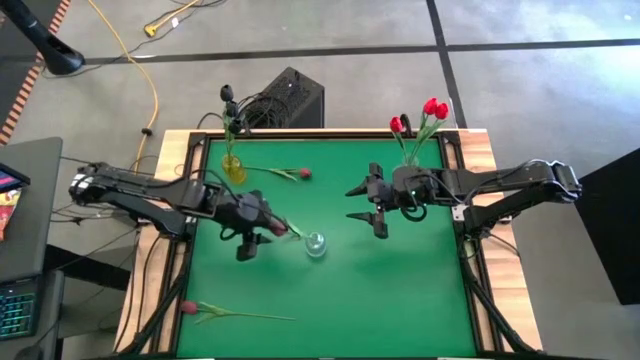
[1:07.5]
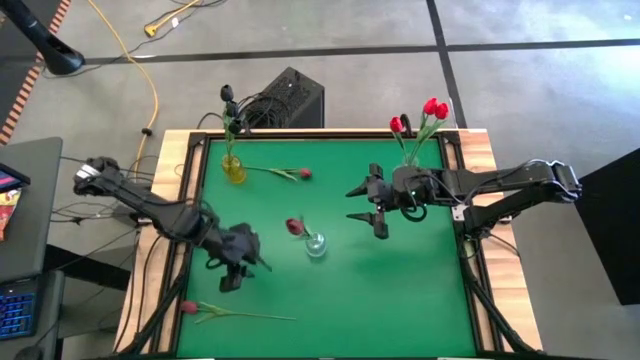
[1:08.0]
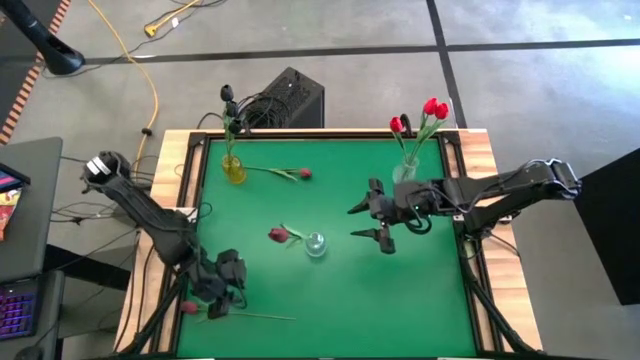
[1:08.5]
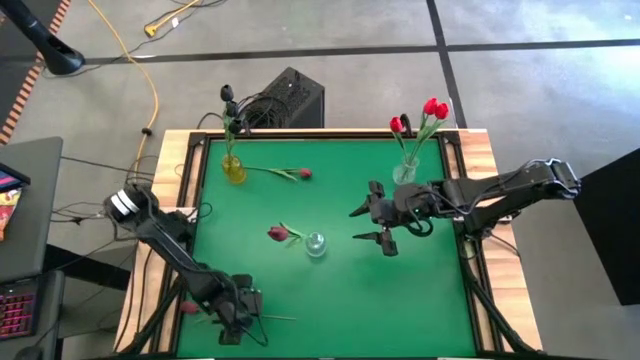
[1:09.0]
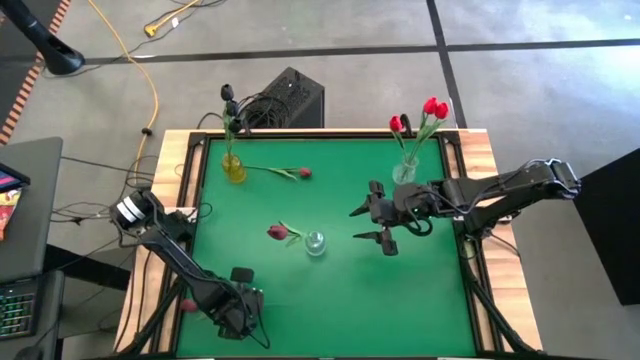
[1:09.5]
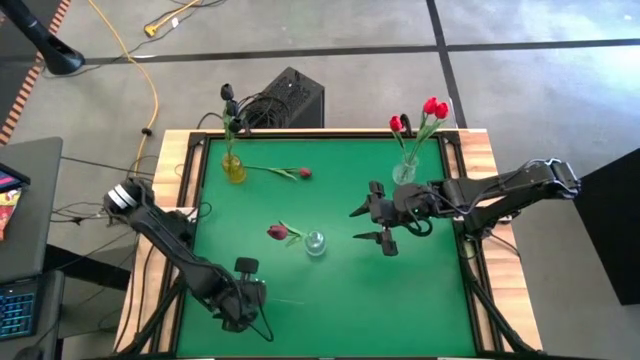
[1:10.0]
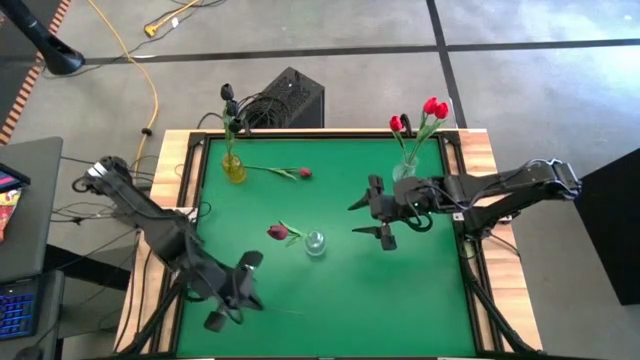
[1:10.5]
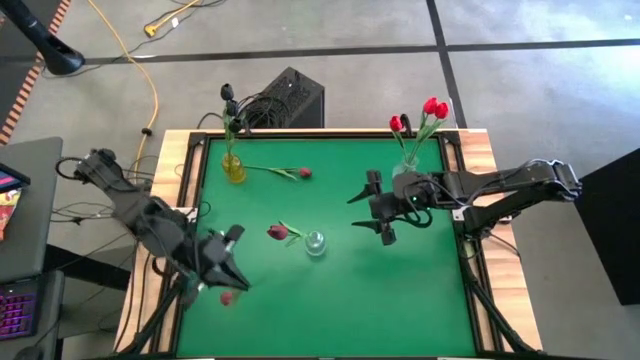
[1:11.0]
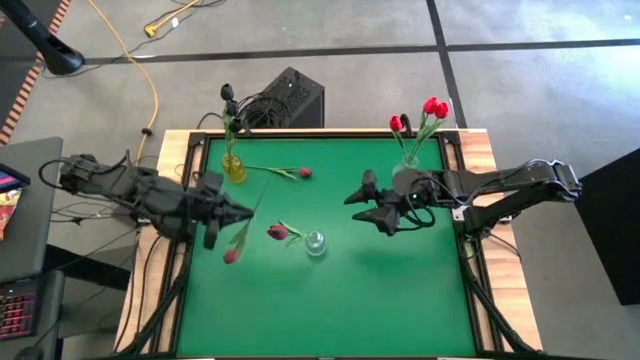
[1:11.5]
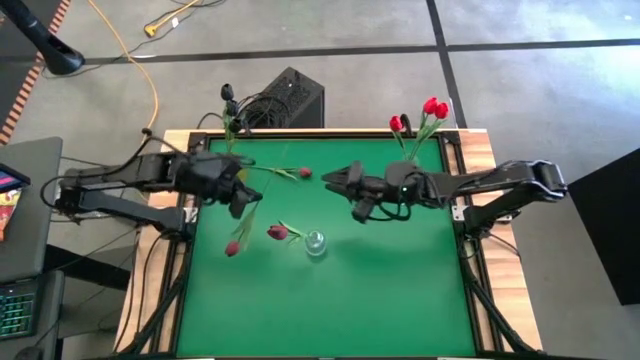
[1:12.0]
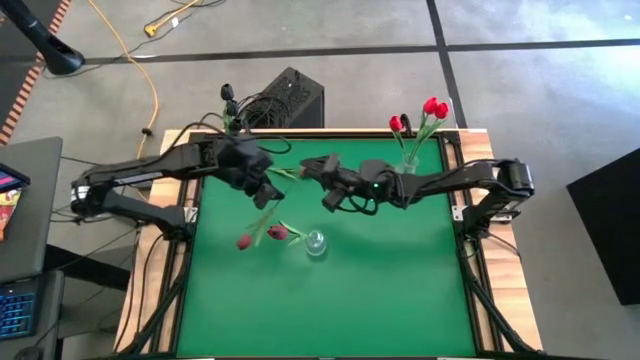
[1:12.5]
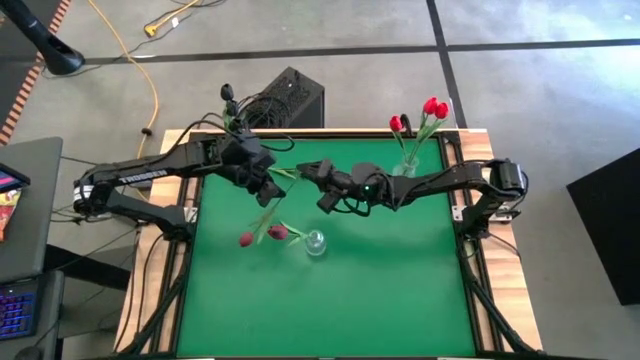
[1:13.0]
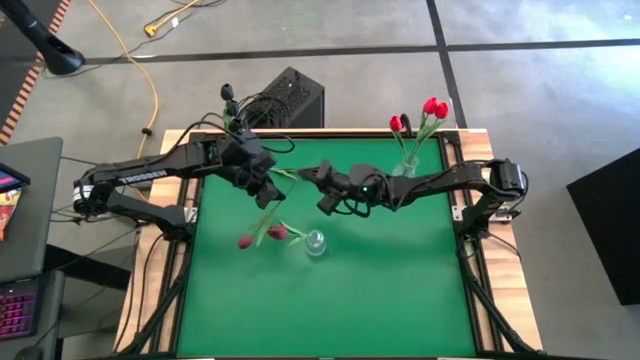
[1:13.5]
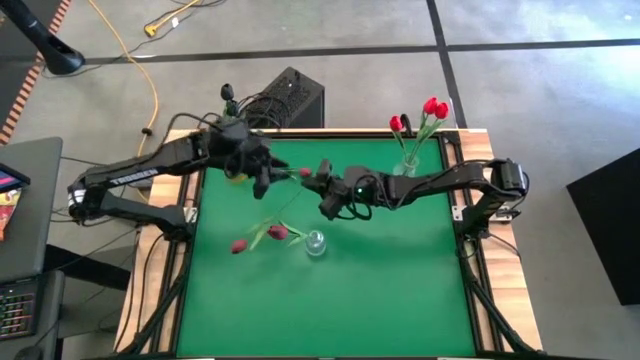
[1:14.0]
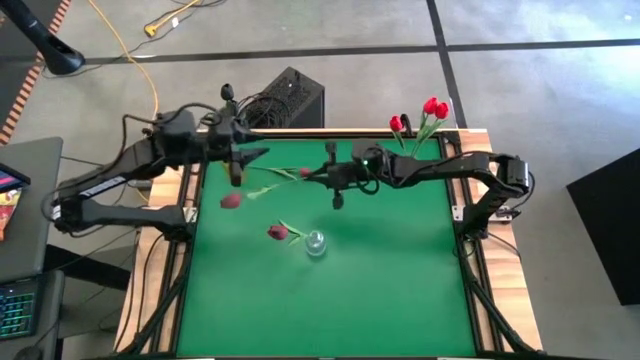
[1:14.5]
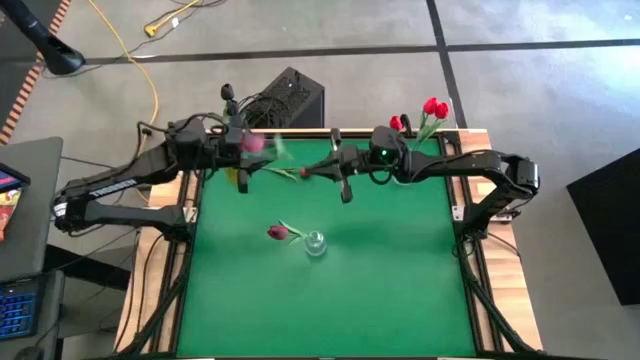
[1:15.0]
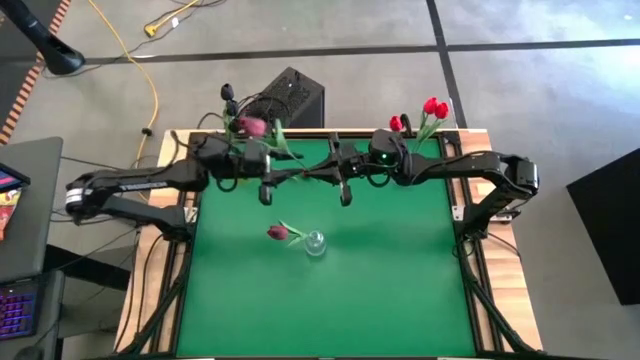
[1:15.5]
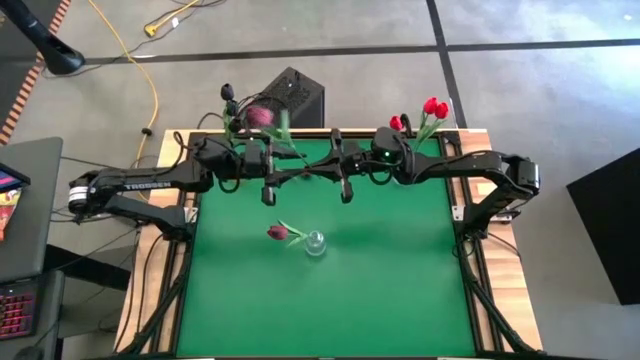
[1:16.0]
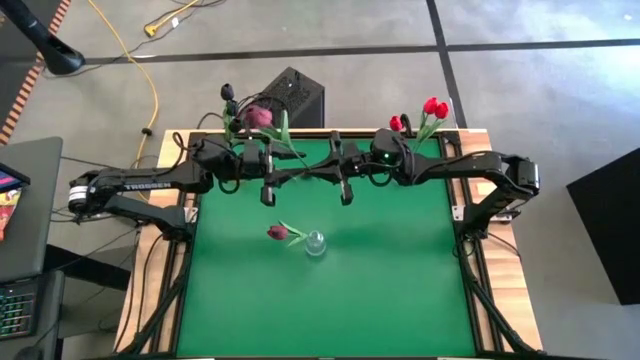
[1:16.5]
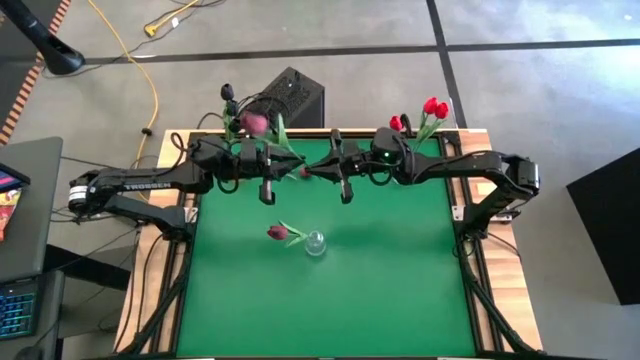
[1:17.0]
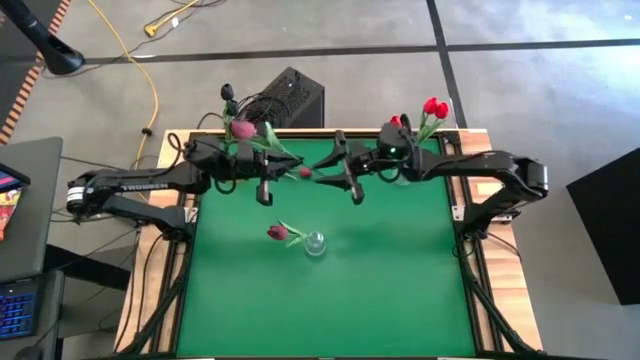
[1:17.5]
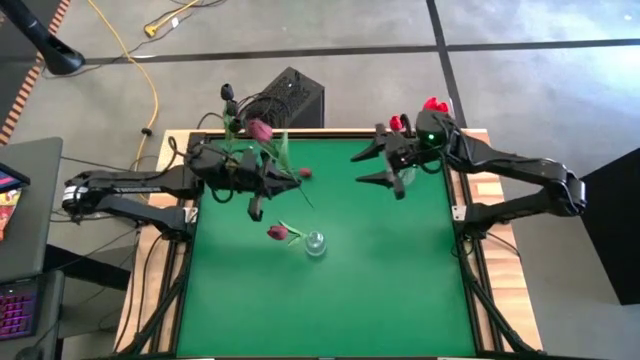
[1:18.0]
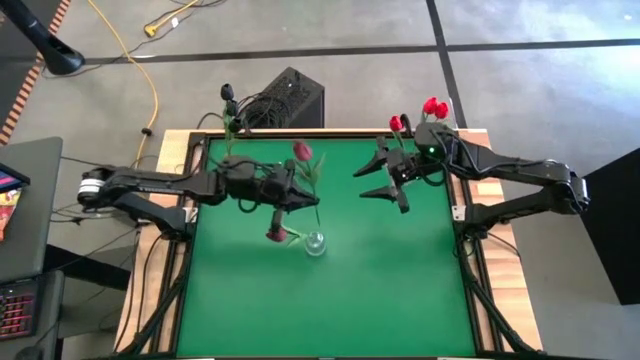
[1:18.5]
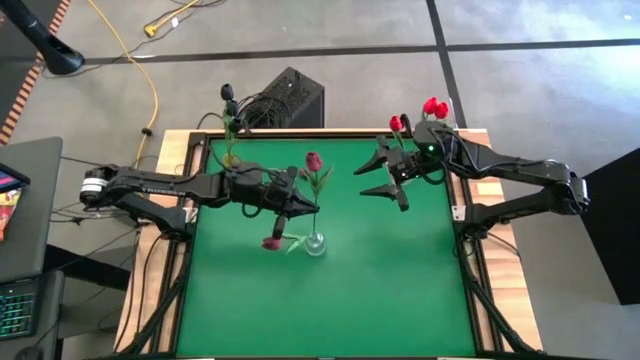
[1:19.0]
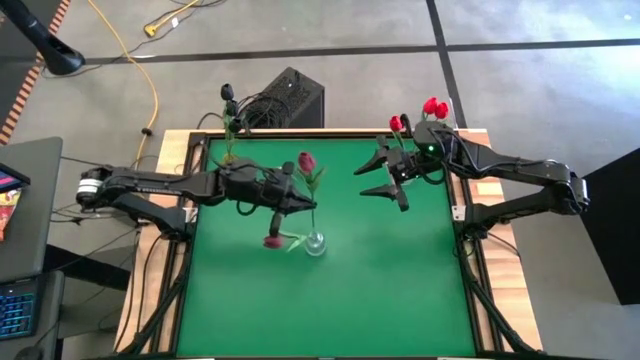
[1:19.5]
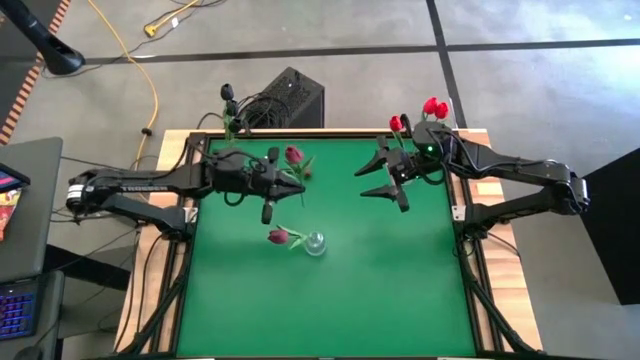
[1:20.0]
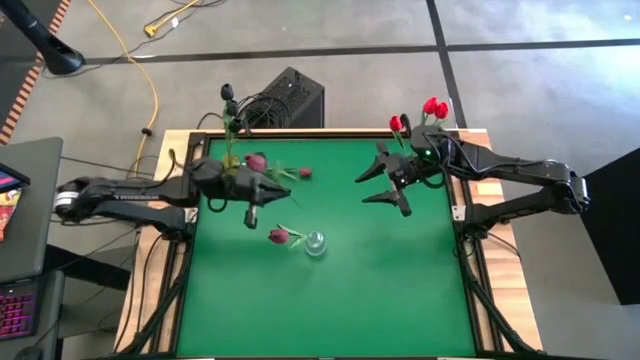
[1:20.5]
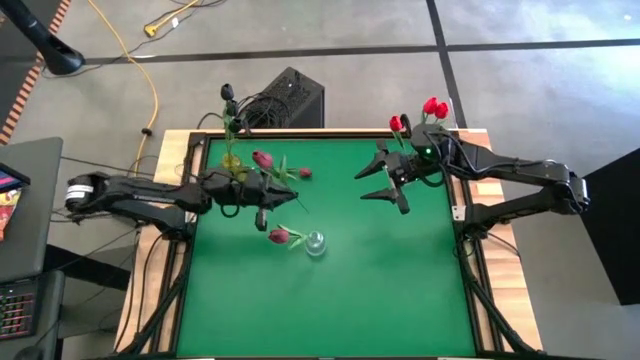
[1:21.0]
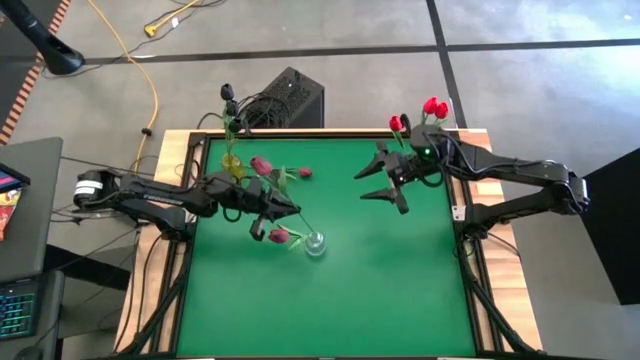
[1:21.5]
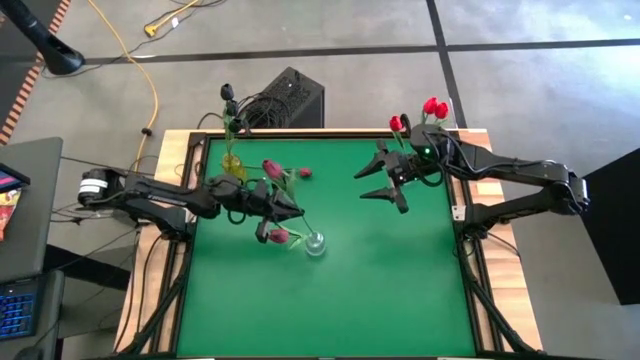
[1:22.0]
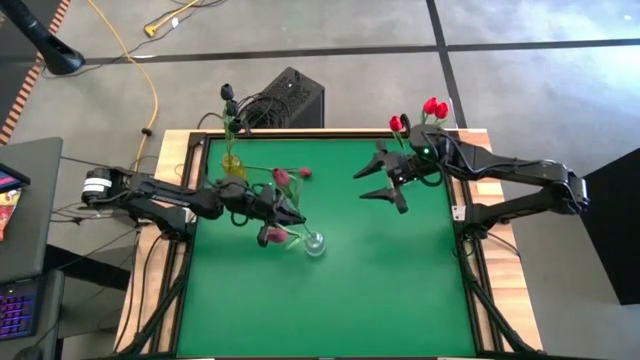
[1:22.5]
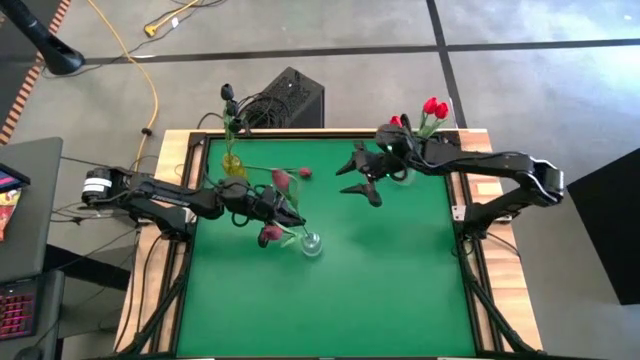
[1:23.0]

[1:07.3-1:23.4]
Task: Sort flowers into vase by color
Put the bottom dark red tulip into the bottom transparent vase

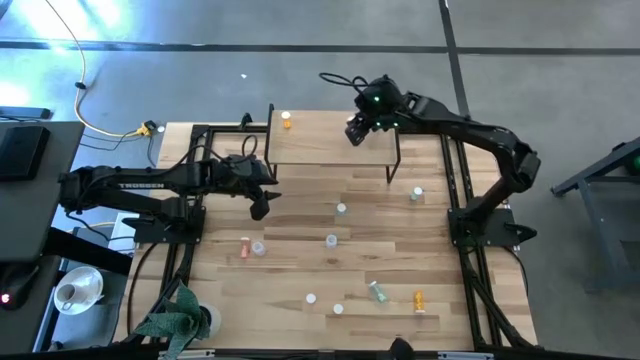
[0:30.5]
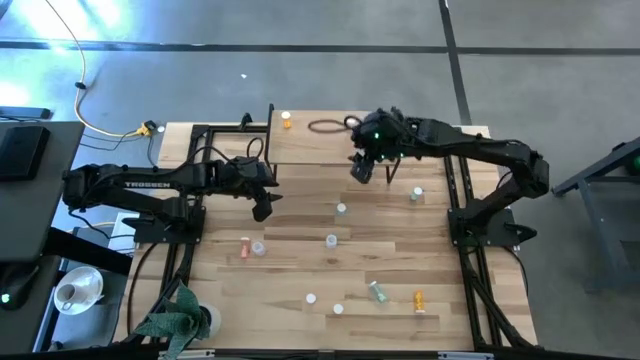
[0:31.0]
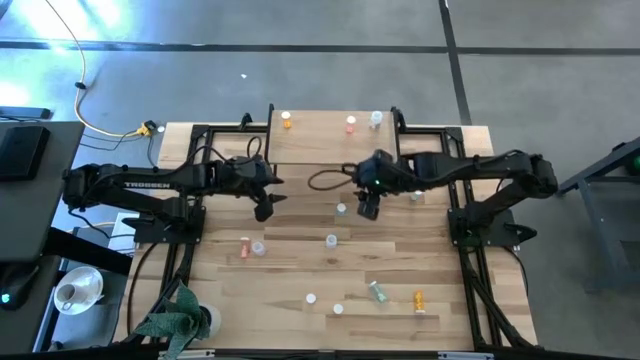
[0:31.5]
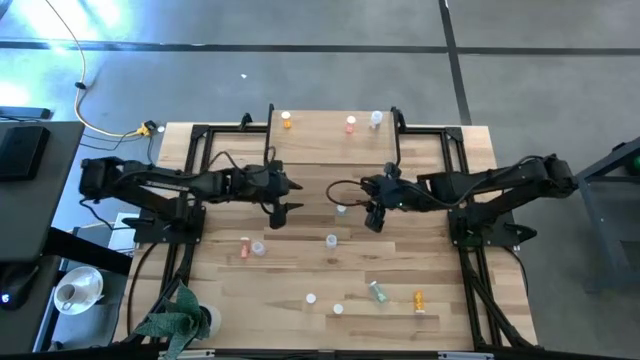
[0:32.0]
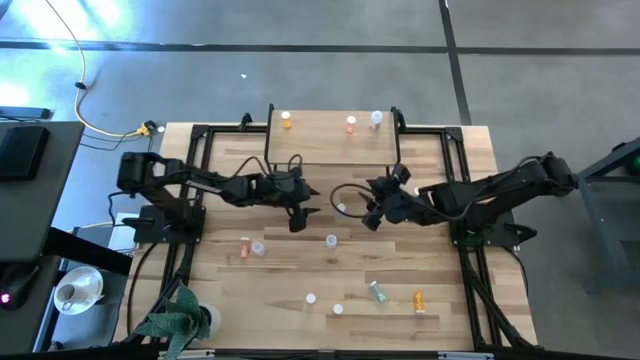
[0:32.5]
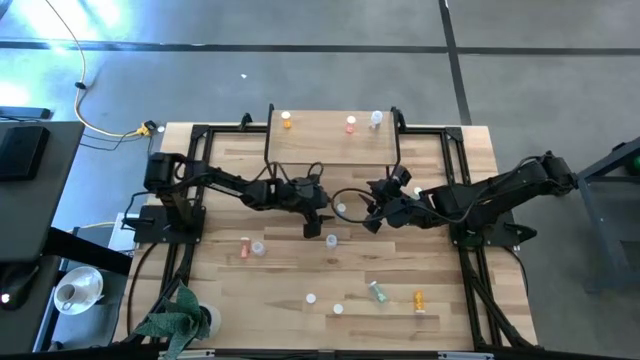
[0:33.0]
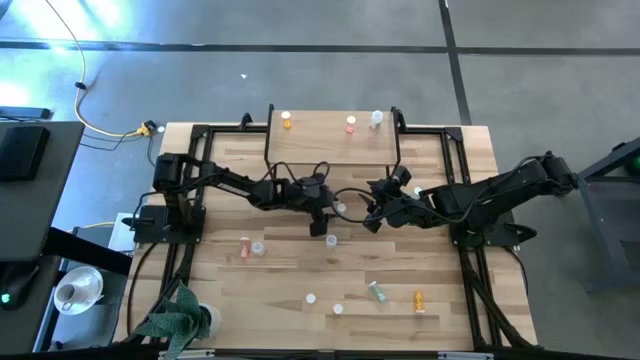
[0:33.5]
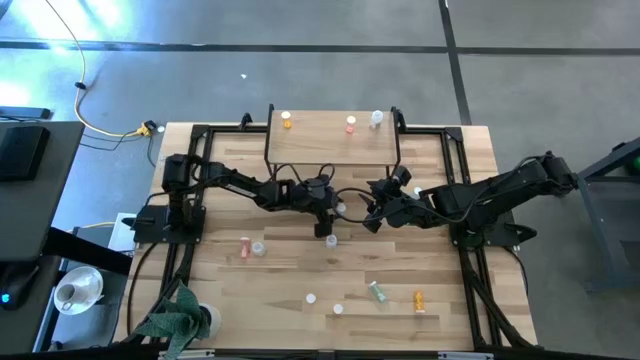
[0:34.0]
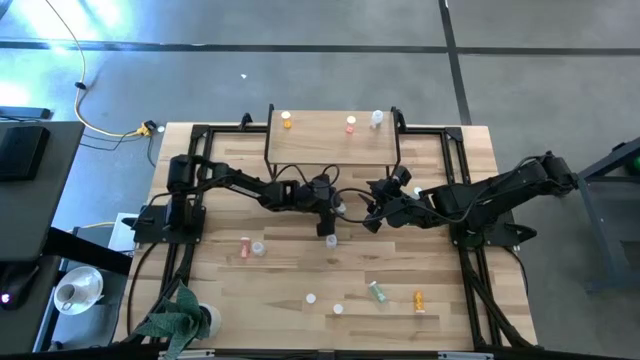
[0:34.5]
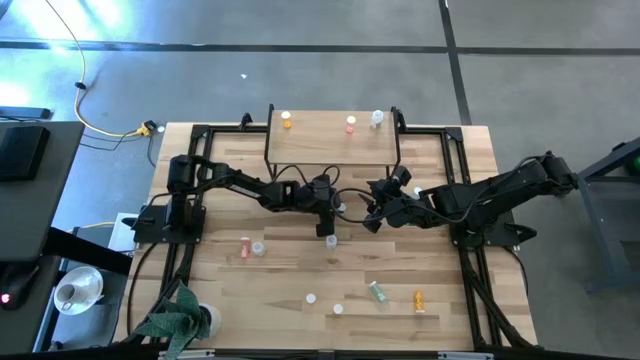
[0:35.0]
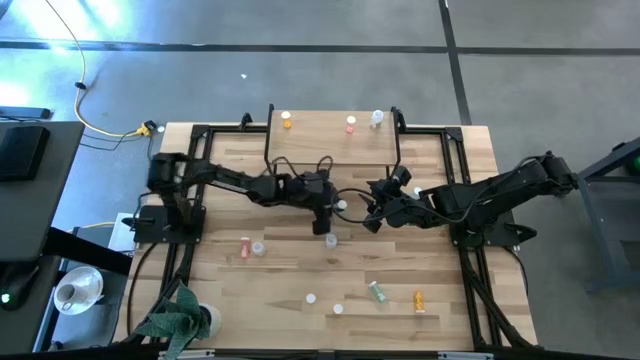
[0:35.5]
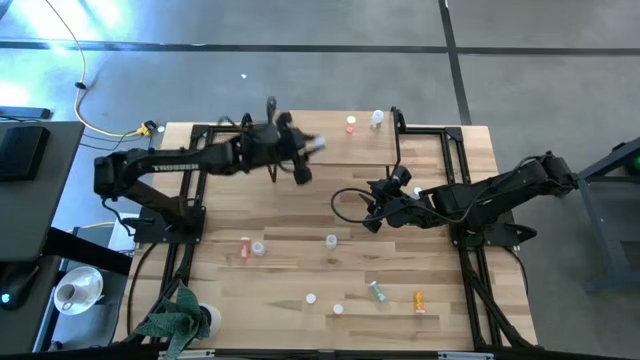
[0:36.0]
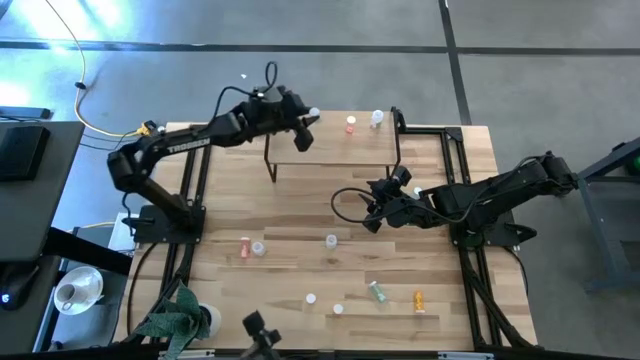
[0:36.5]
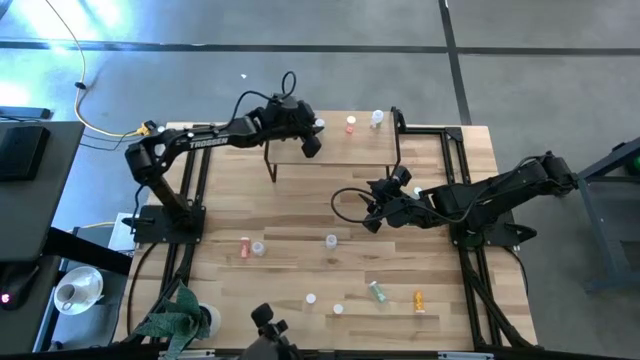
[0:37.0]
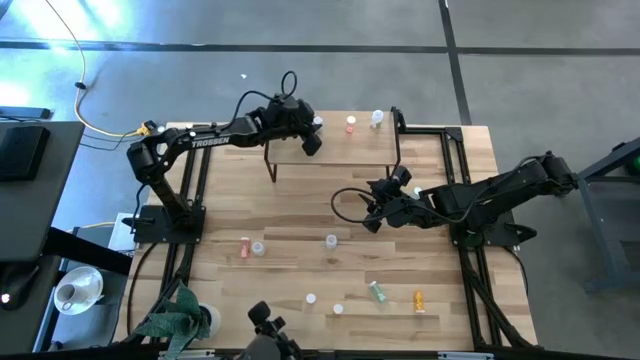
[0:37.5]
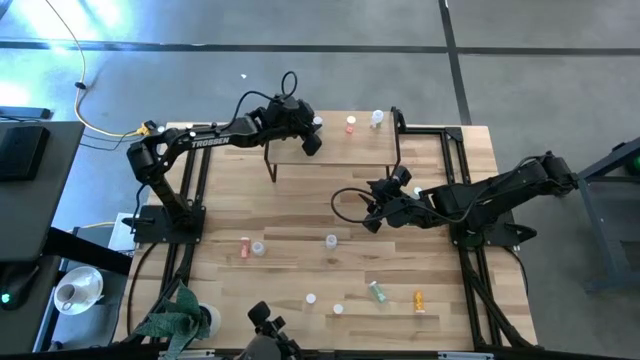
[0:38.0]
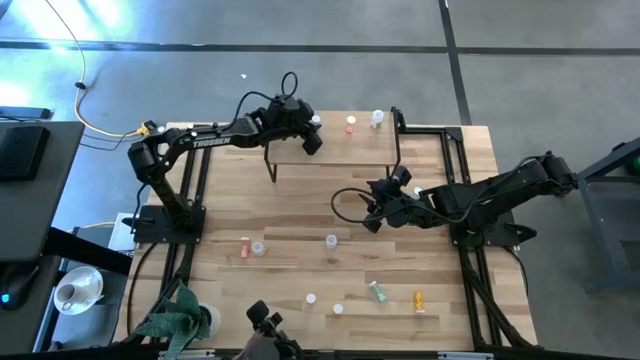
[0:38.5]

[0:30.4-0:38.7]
Task: Pick and place medicine bottles onto shelf by color
Put the top left blue pill bottle on the shelf
